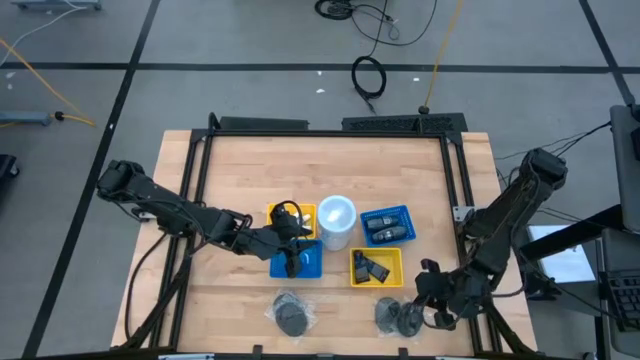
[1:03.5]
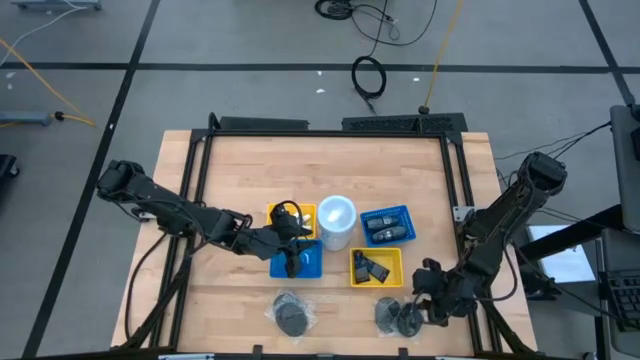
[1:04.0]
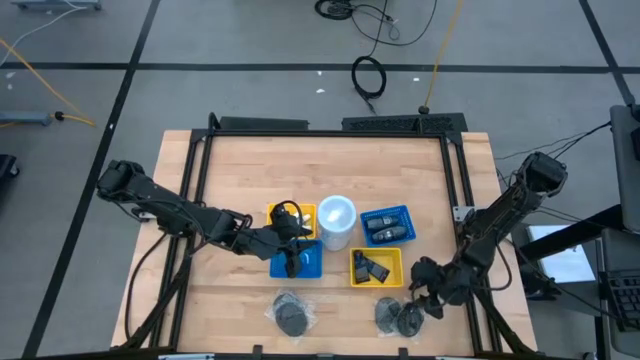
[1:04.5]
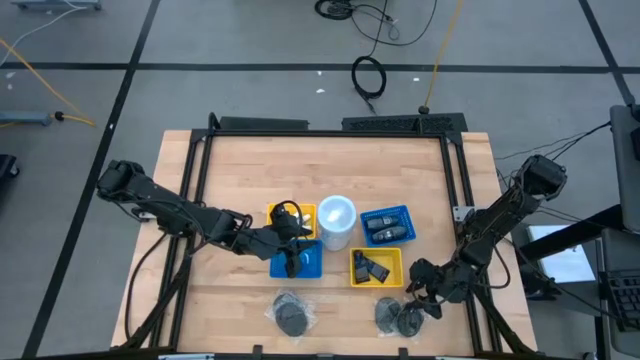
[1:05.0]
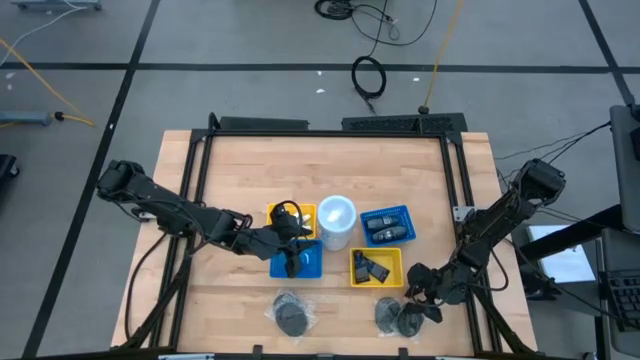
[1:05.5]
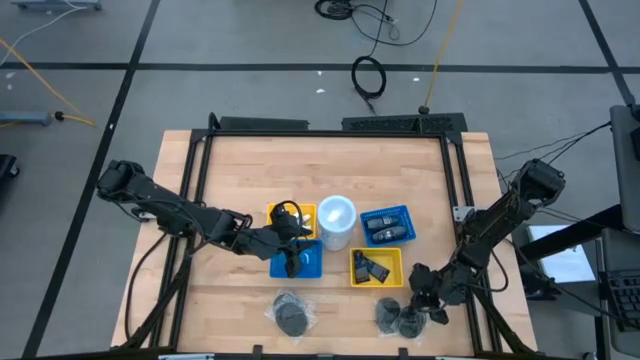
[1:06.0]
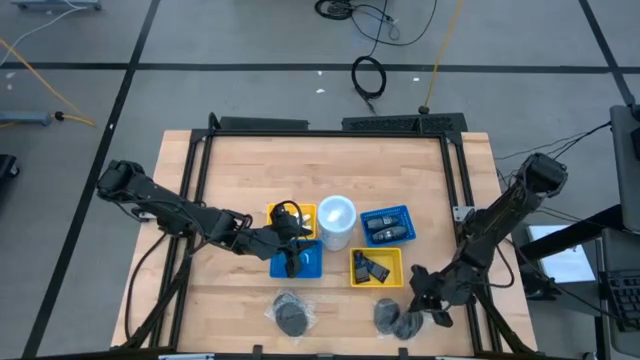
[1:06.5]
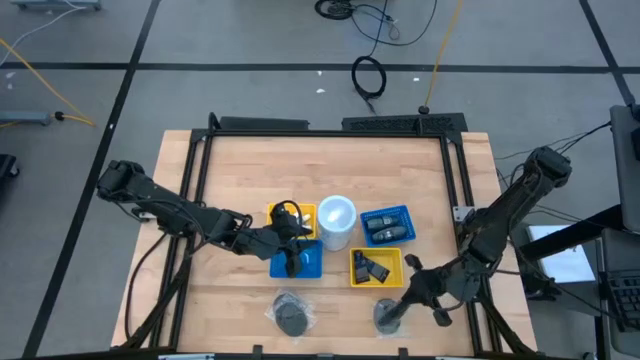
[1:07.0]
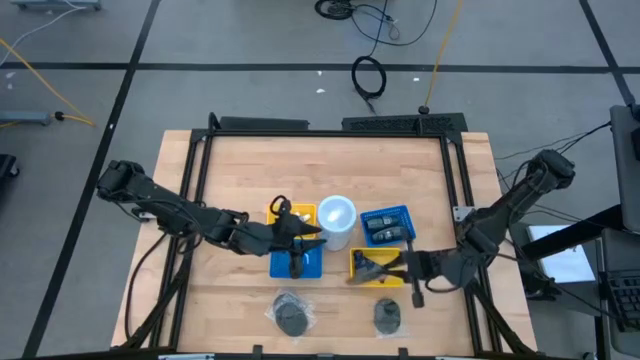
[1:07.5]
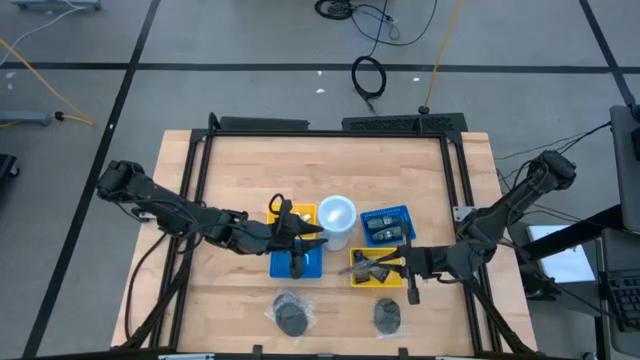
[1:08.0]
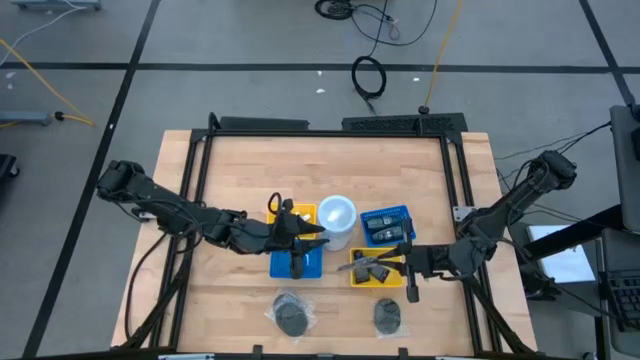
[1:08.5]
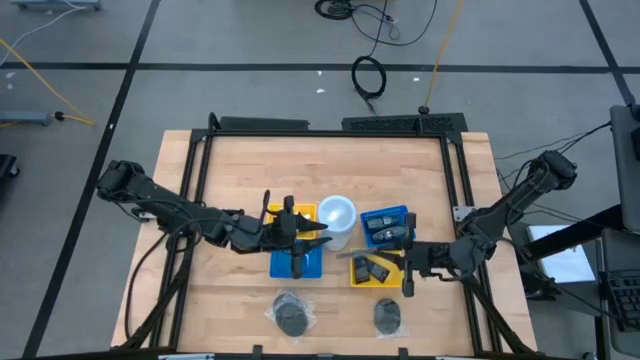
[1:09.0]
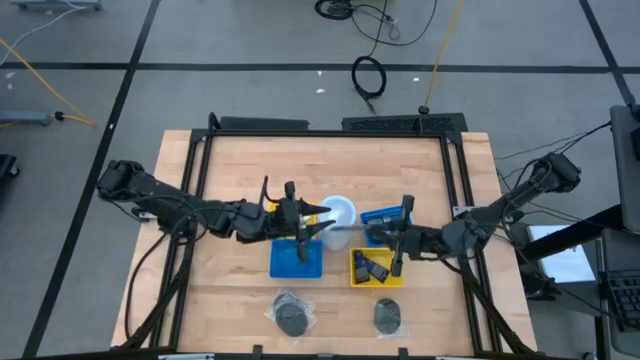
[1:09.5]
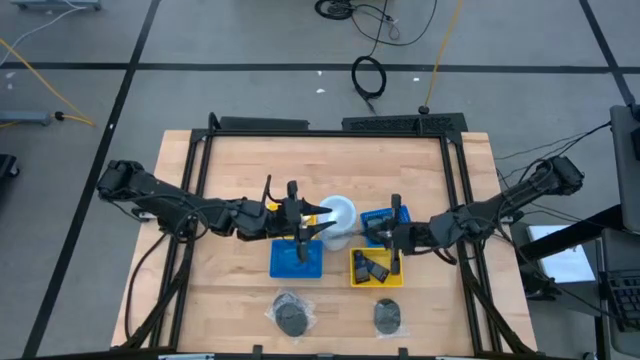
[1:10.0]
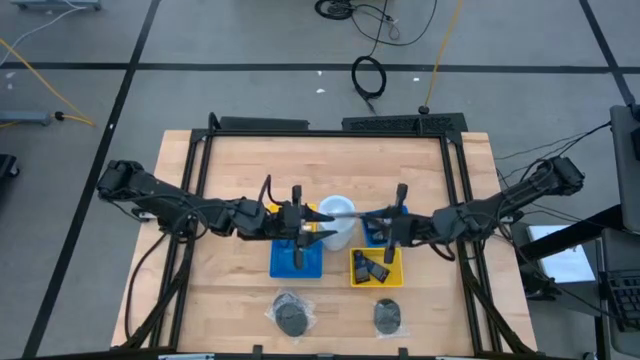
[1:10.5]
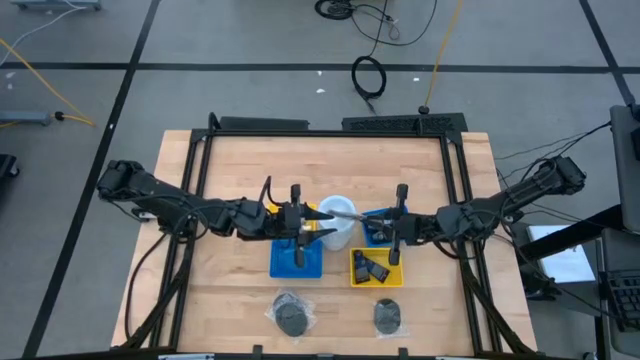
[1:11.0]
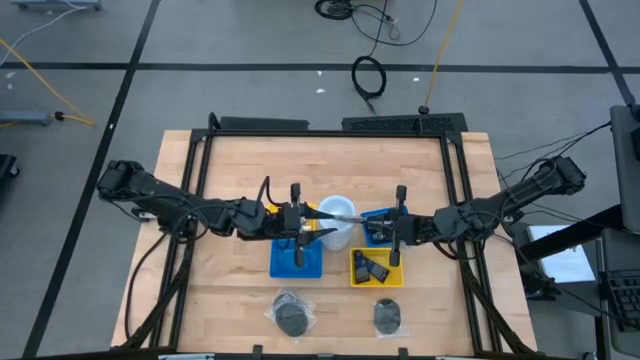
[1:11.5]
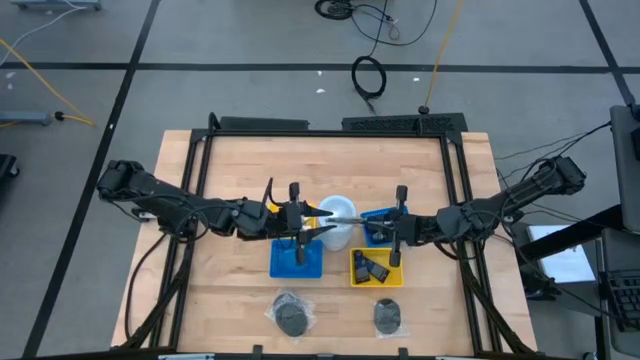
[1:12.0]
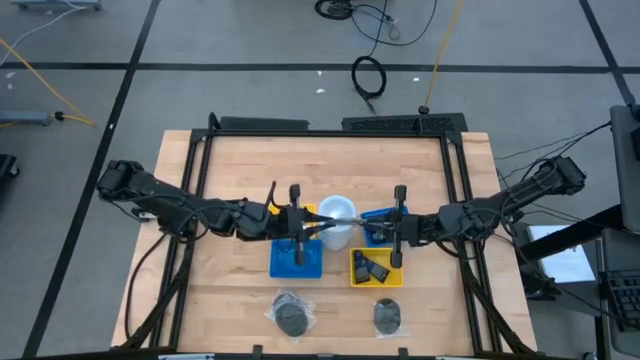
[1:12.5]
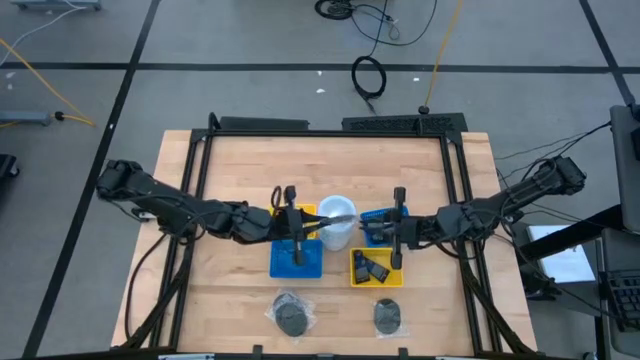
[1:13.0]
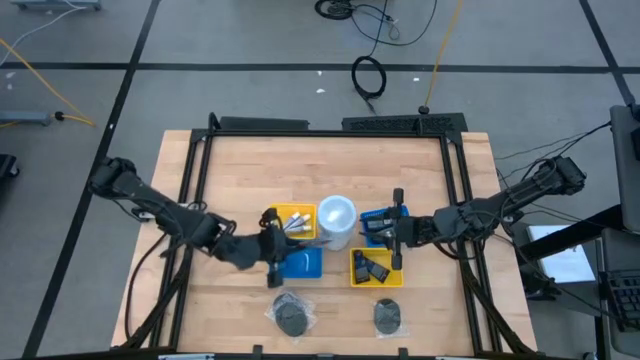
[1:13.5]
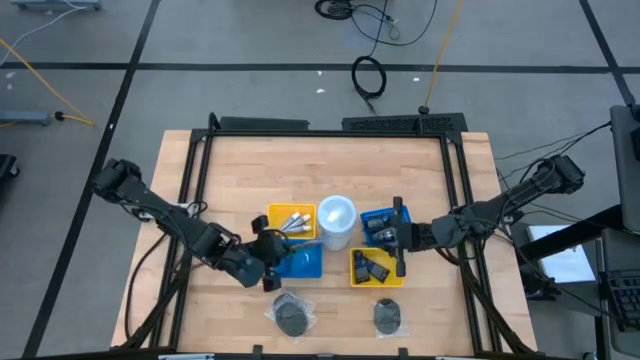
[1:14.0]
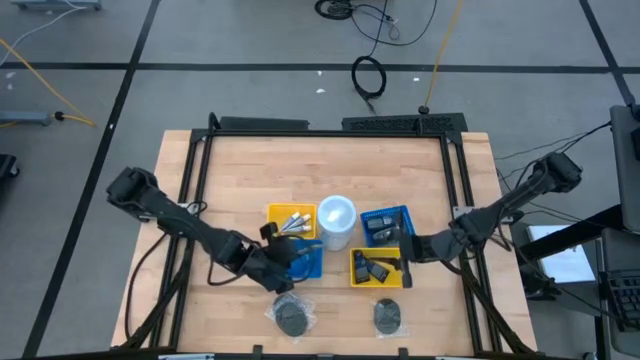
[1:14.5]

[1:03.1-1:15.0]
Task: Pick & Place Travel size toiletries
Put the black hairbrush into the bottom blue bin

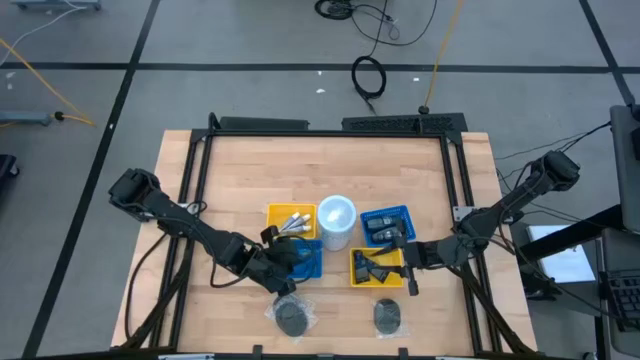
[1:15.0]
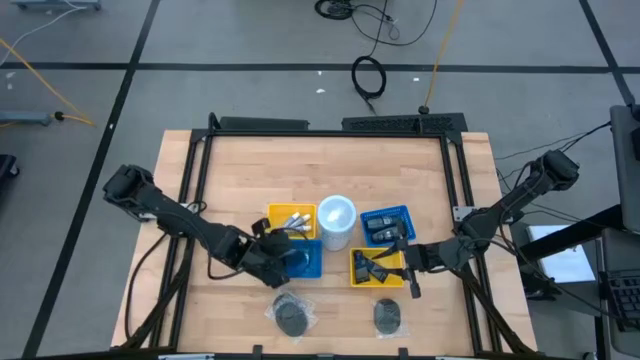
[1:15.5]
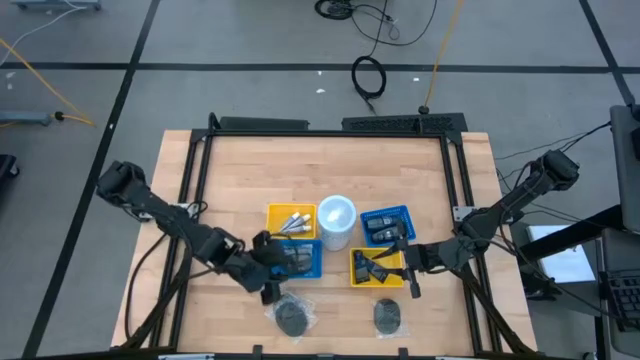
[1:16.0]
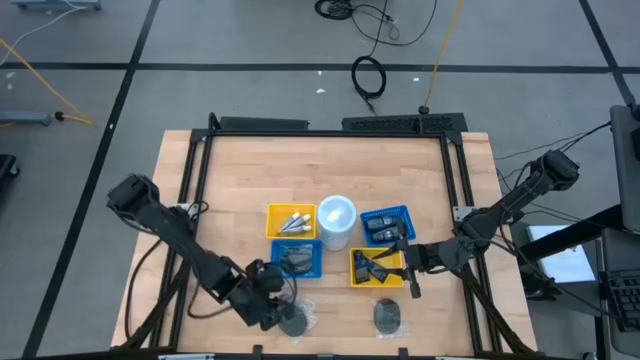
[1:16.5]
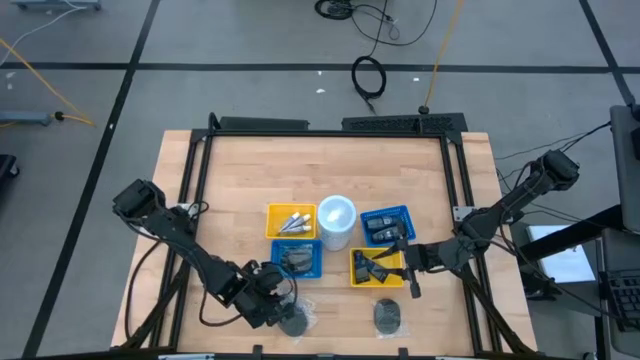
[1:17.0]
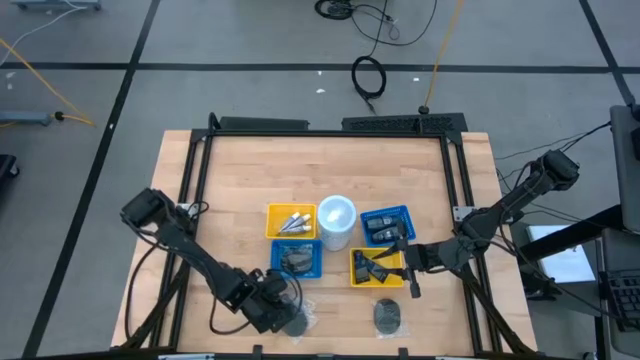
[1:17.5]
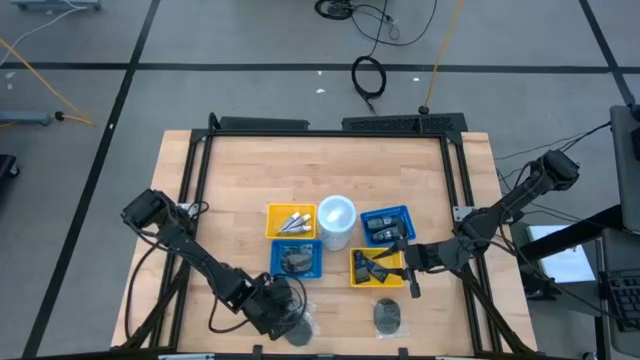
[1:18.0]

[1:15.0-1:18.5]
Put the black hairbrush into the bottom blue bin

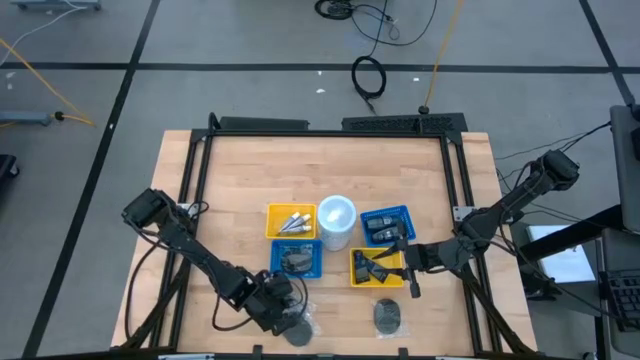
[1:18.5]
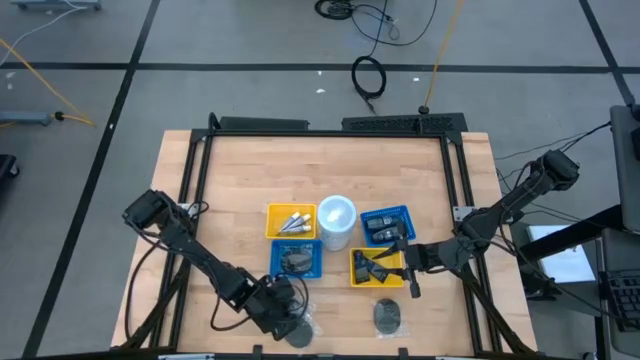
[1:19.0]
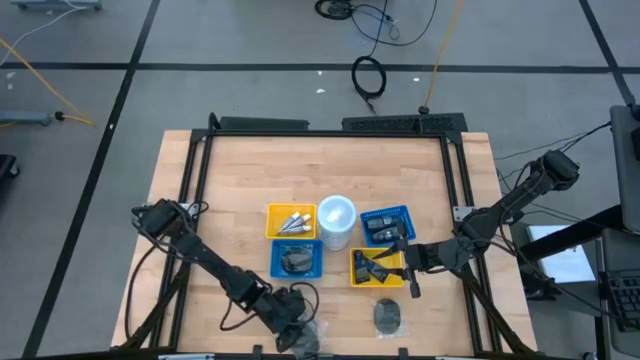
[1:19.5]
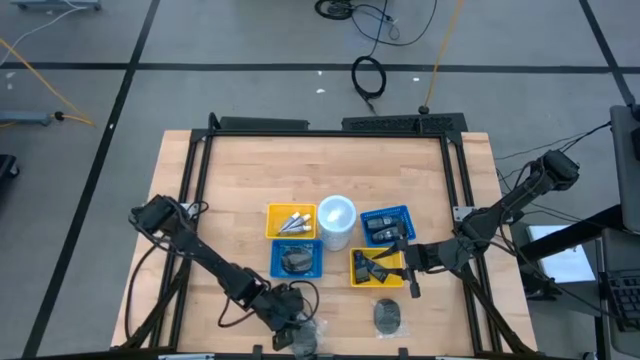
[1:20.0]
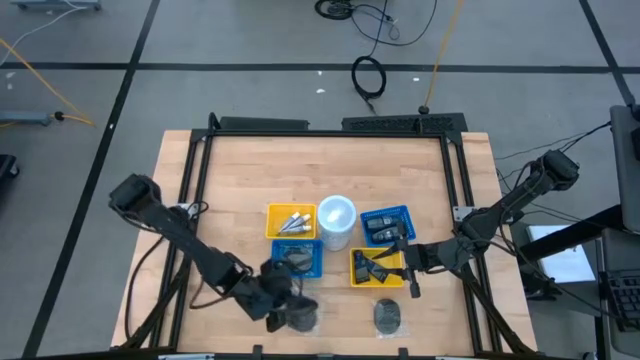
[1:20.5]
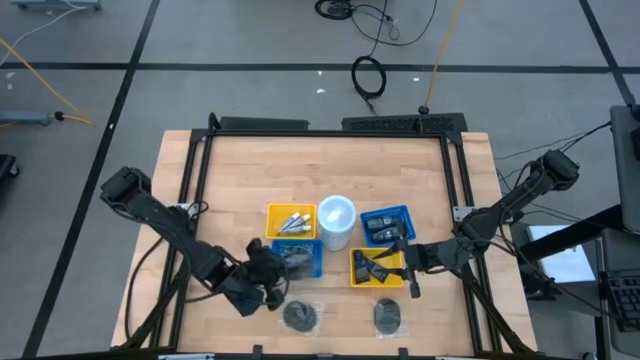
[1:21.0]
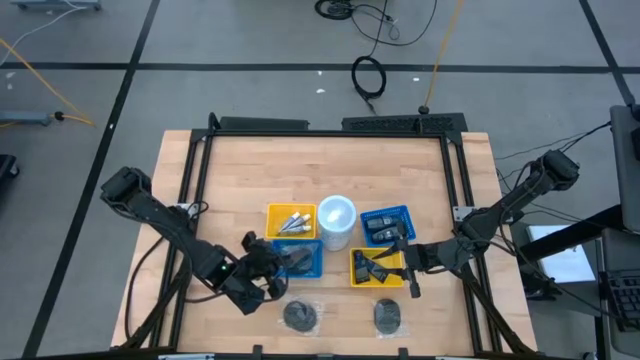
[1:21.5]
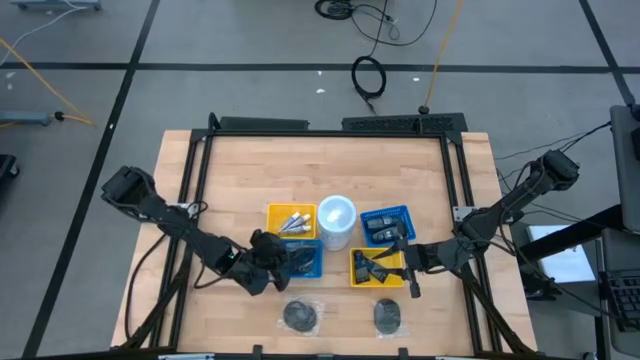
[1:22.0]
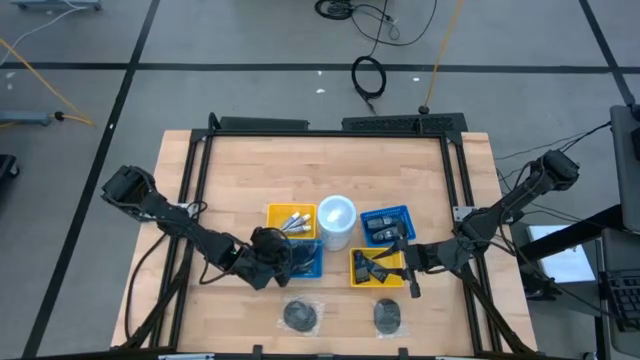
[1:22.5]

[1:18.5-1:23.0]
Put the black hairbrush into the bottom blue bin

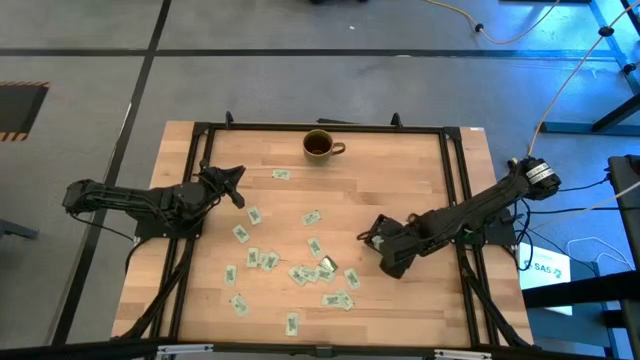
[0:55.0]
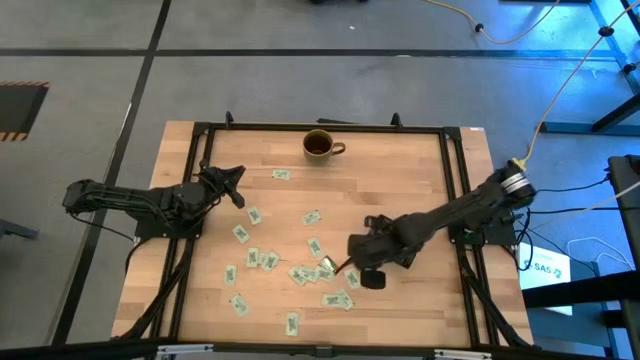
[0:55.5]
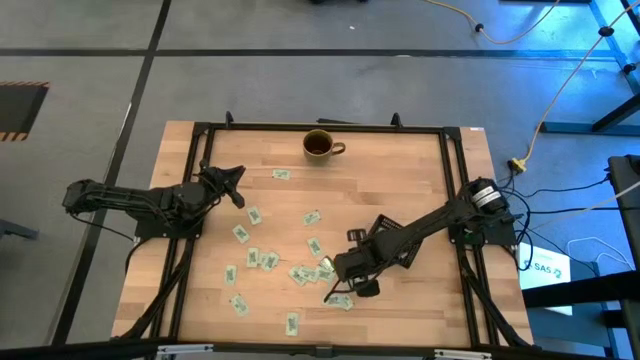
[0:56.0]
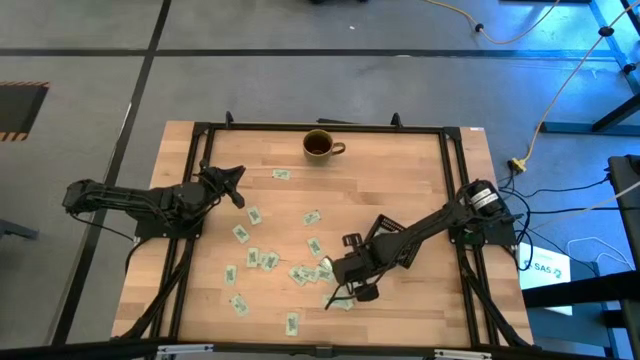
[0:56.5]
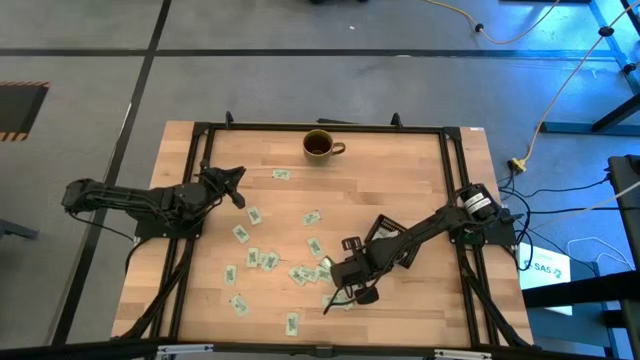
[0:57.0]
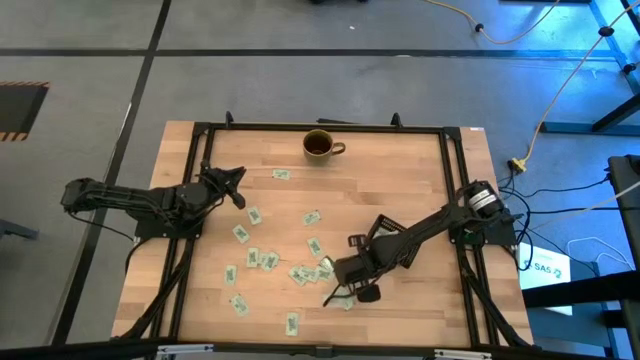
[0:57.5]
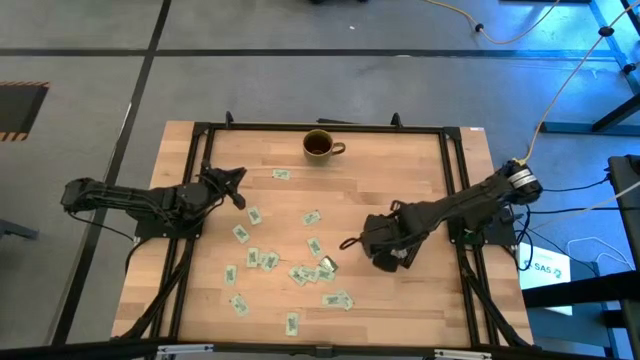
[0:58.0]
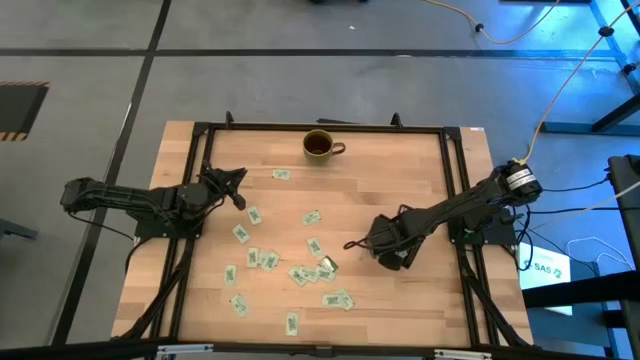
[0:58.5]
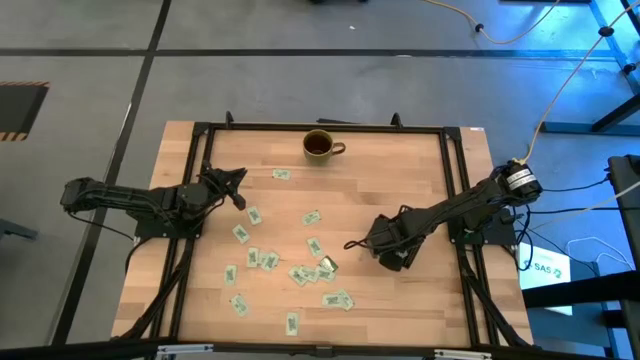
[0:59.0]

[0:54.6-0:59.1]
Task: Pick and place Stevia / Truvia into bins
Put the stevia packet into the black bin
